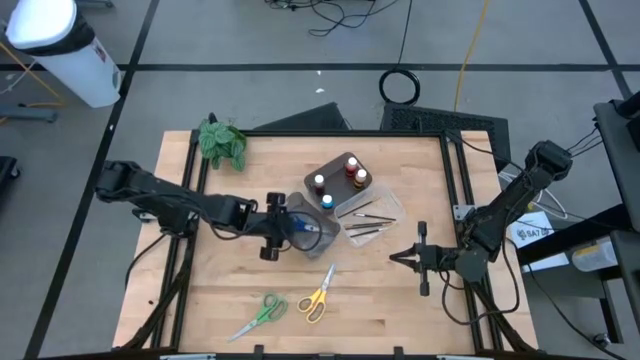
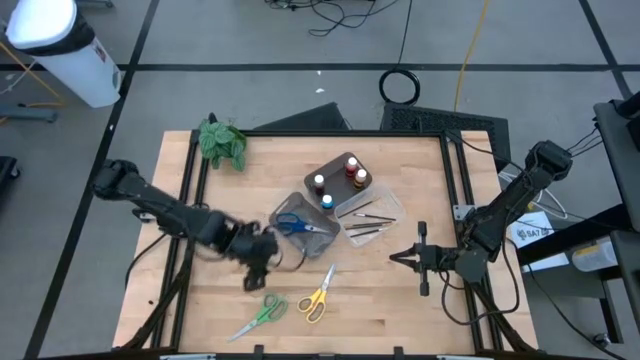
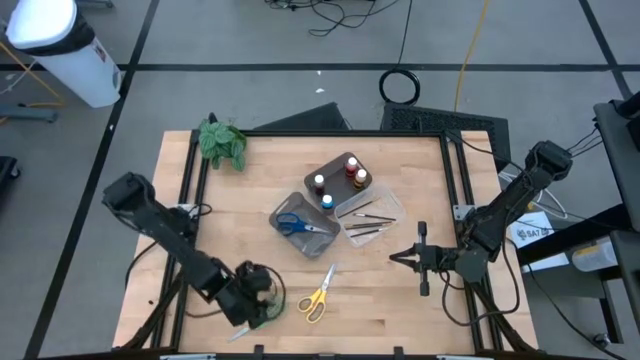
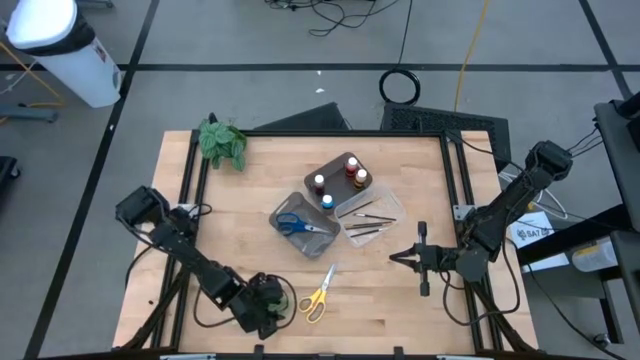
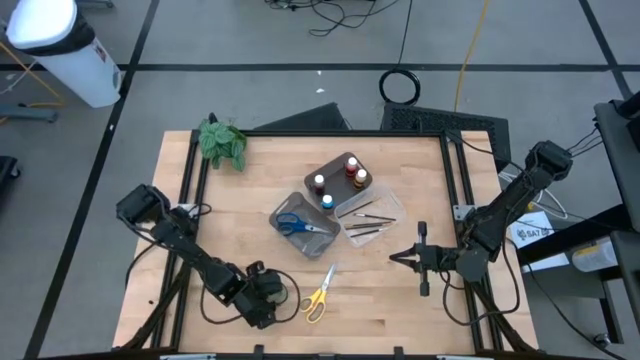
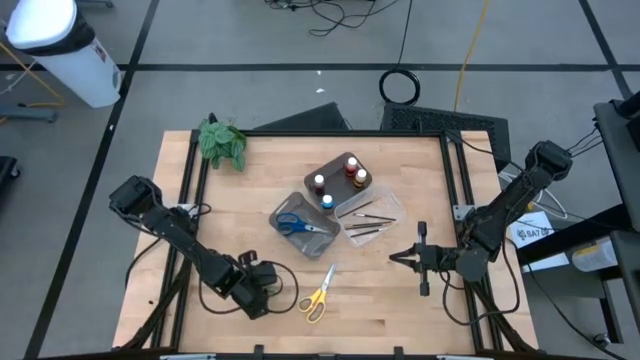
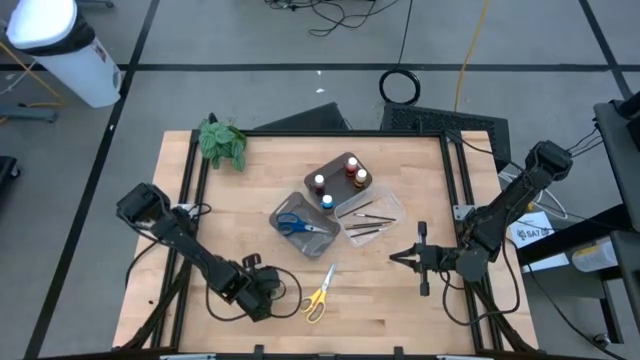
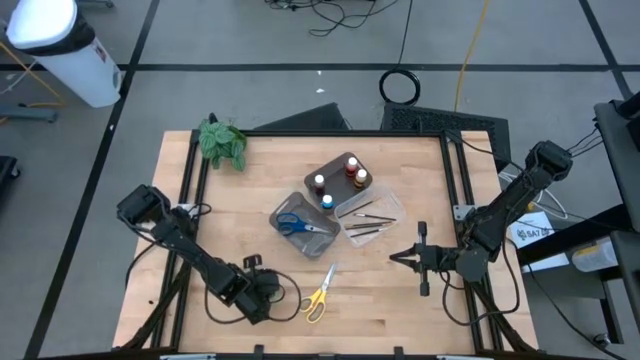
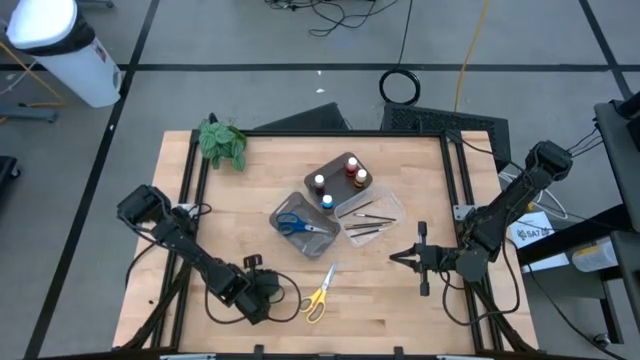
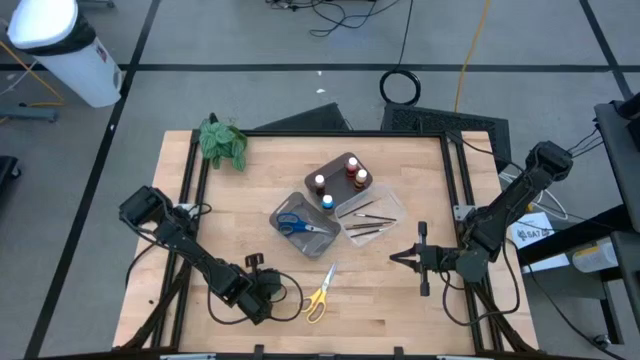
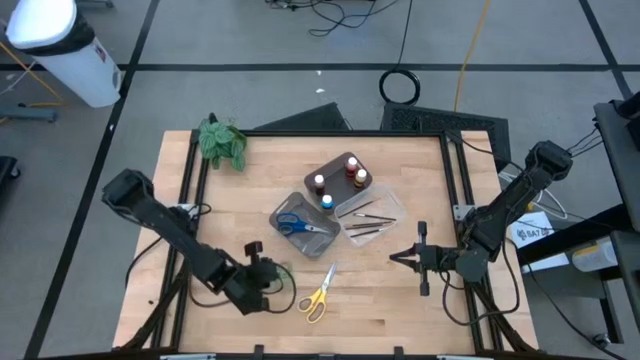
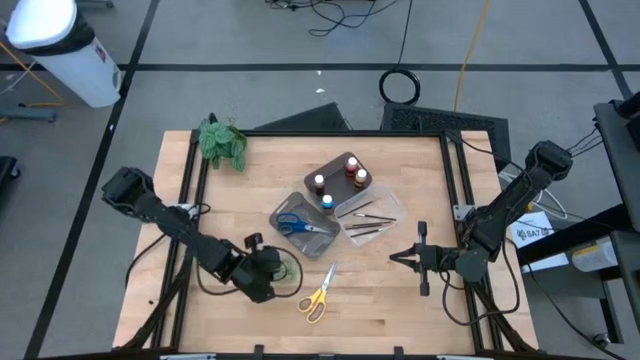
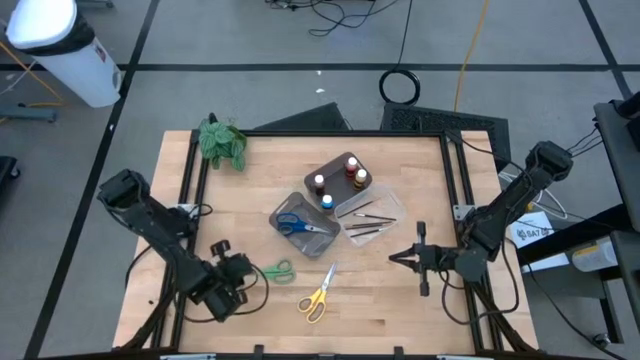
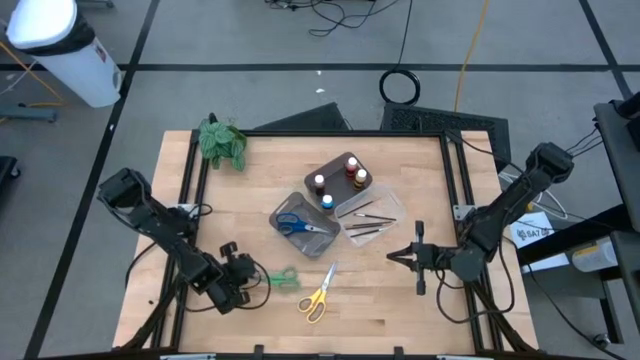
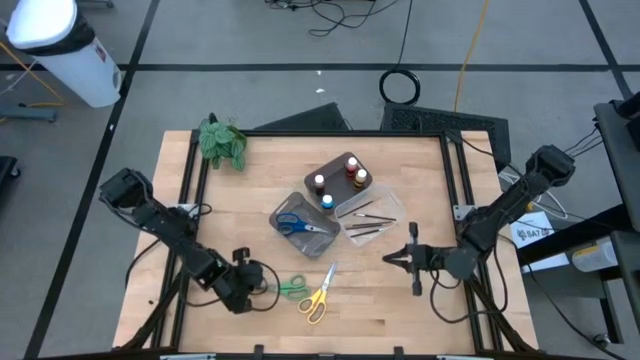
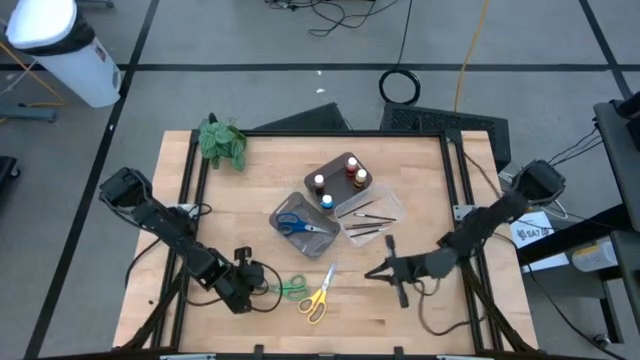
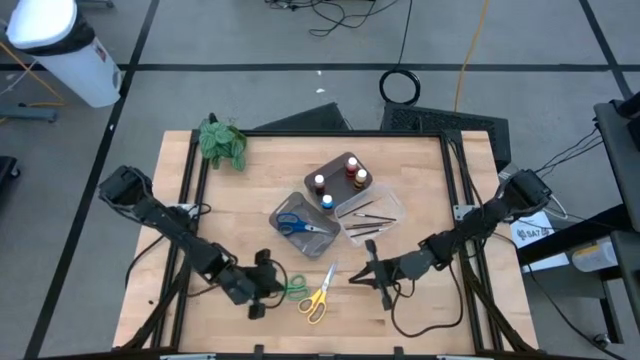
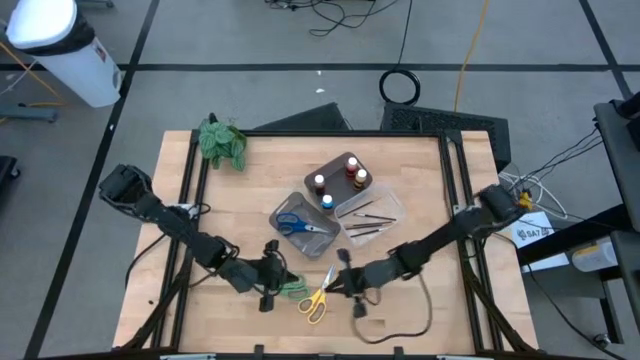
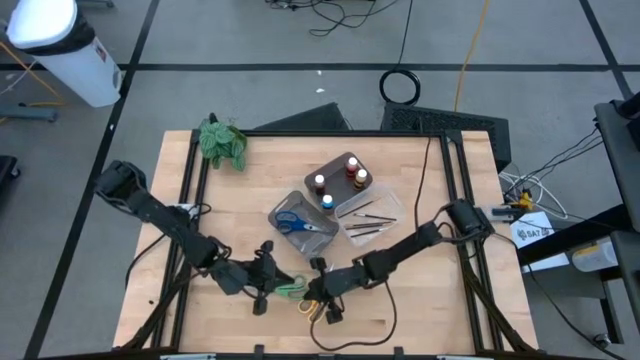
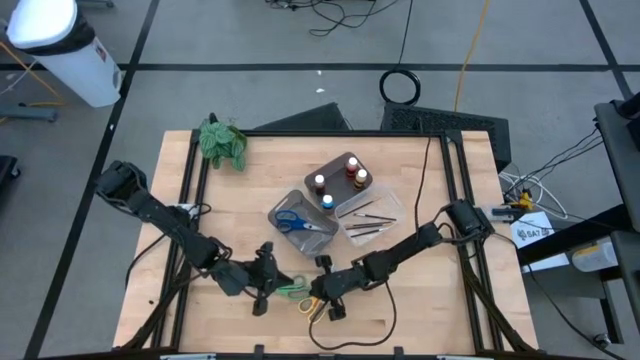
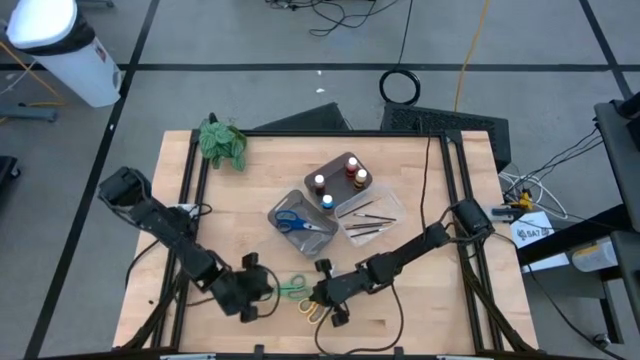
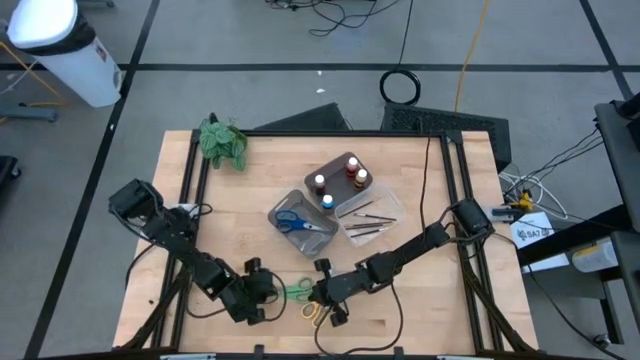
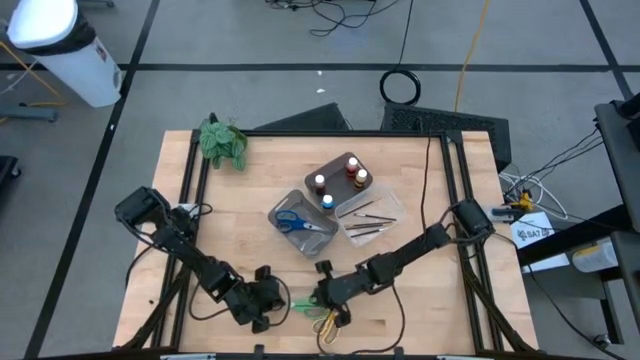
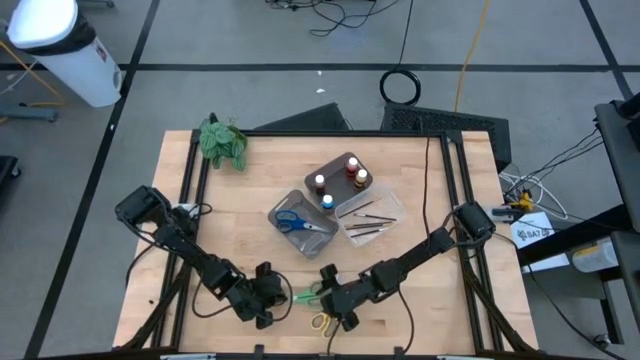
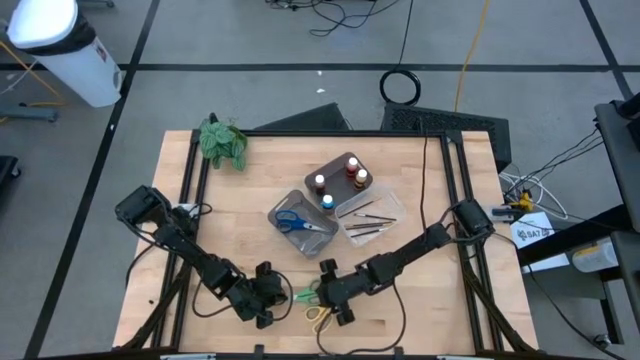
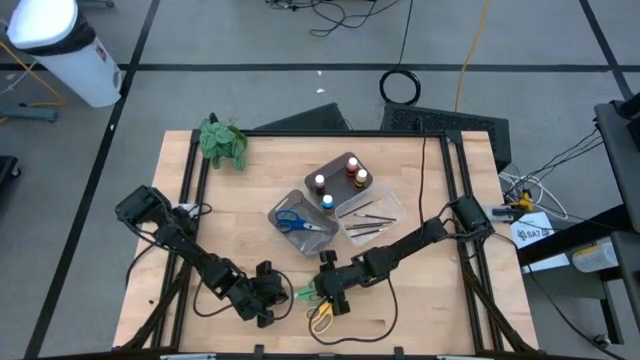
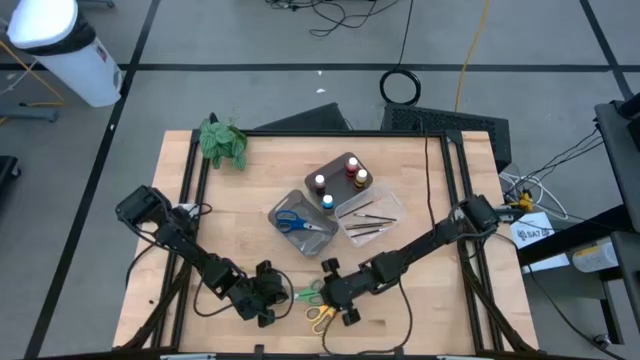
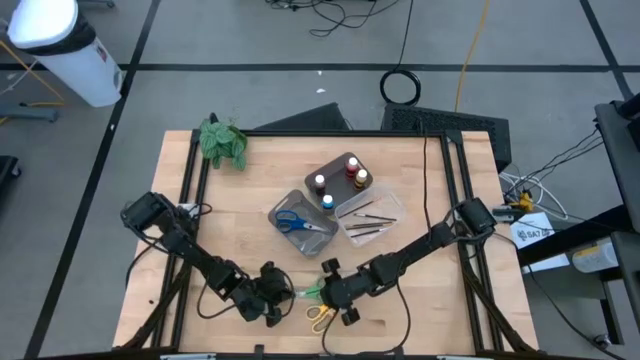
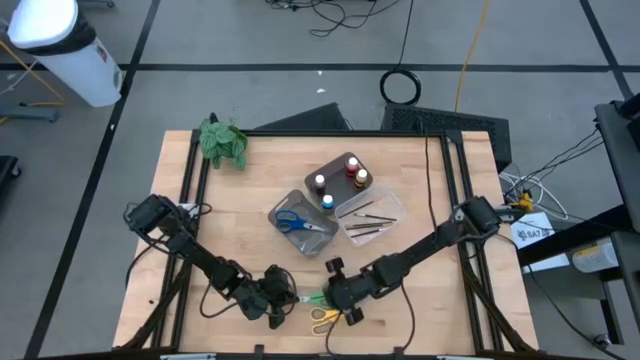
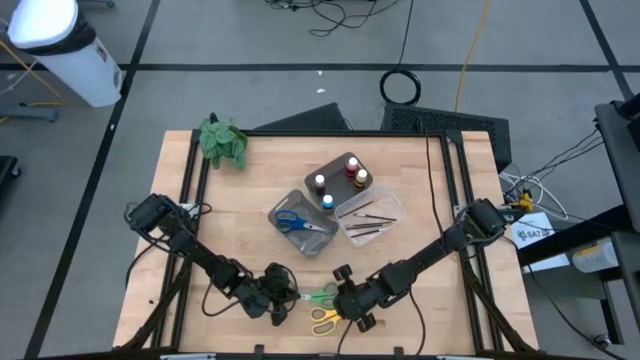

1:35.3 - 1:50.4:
Task: Pick & Place Paint Supplies
Put the green scissors into the bottom black bin

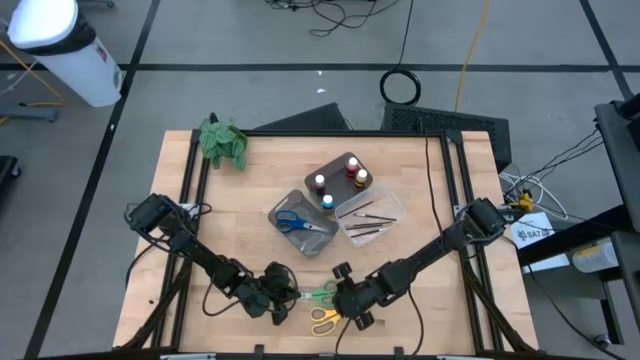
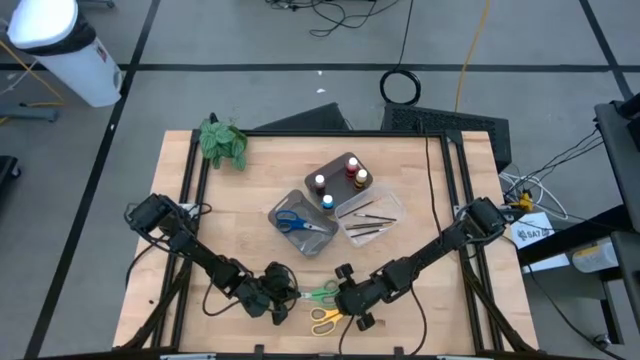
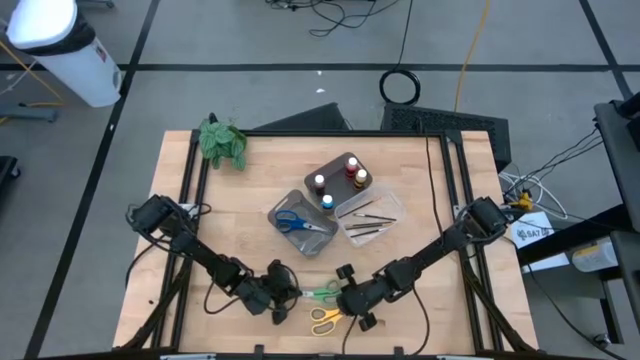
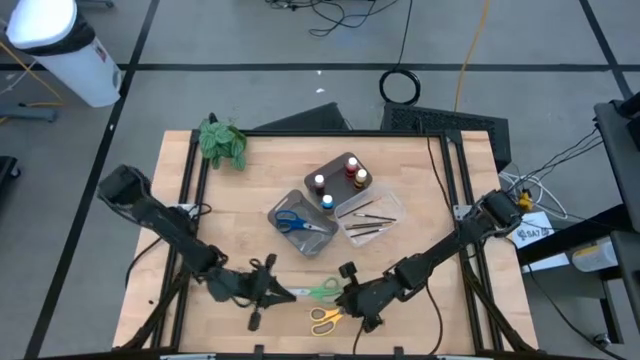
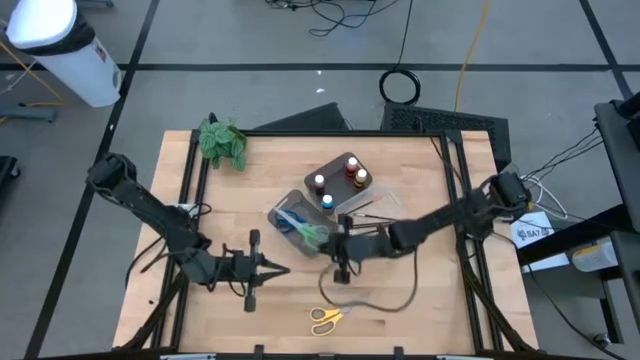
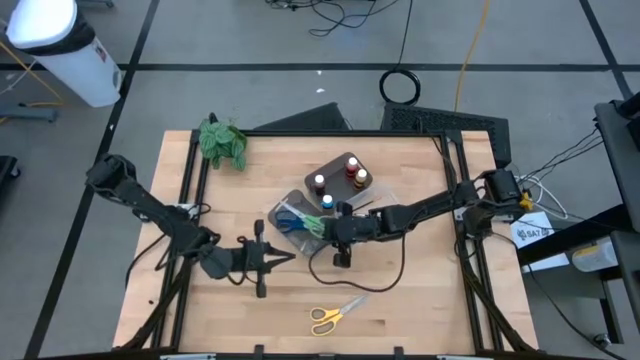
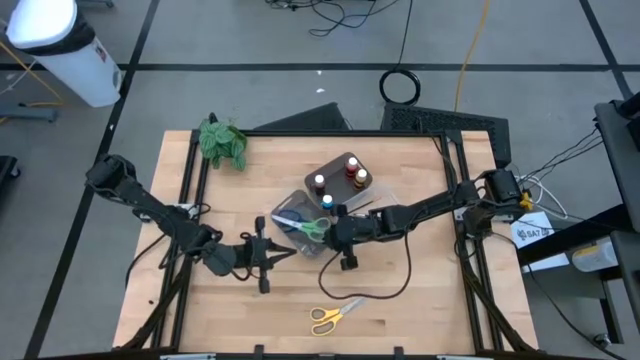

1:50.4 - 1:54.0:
Put the green scissors into the bottom black bin

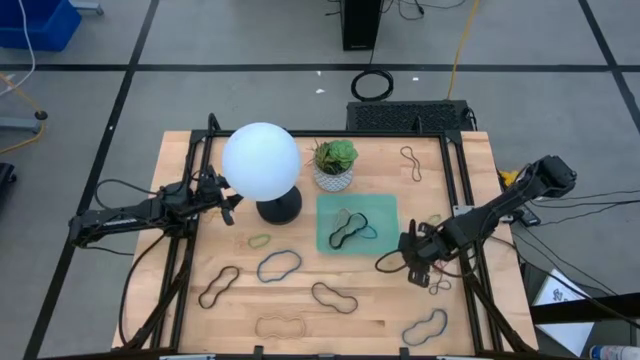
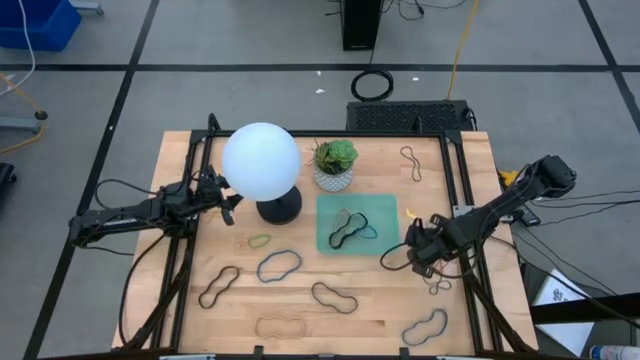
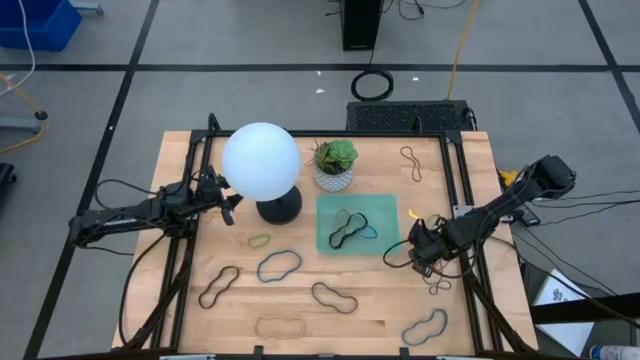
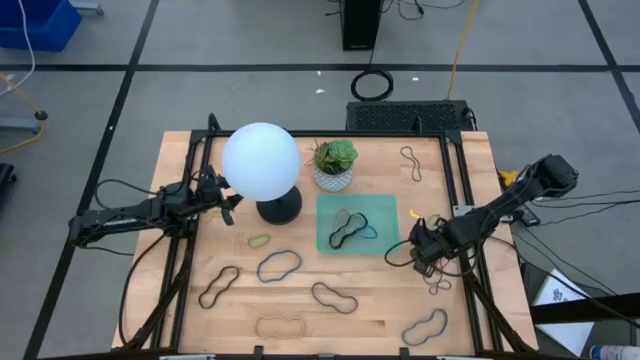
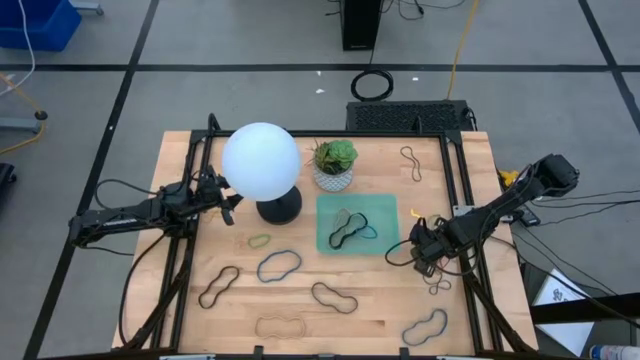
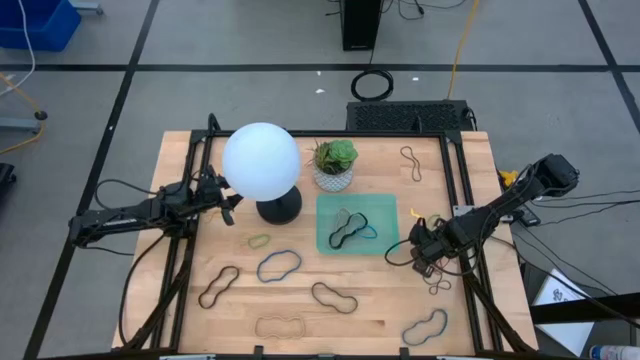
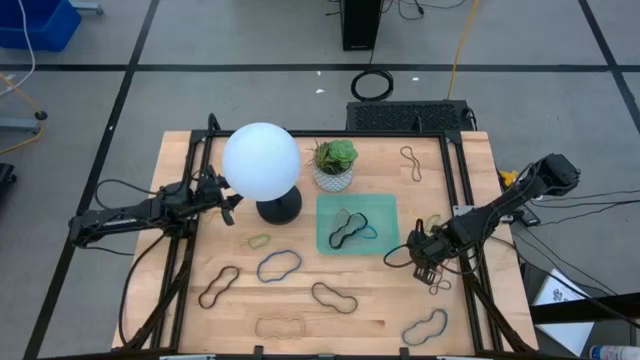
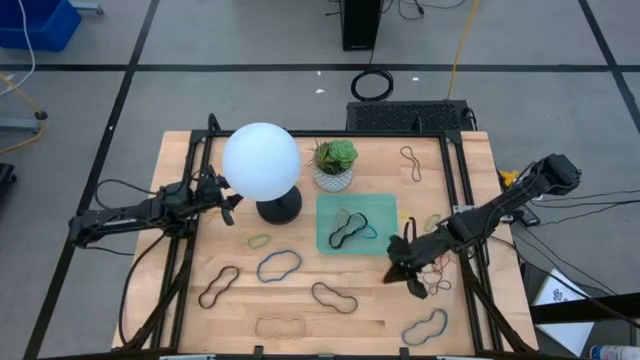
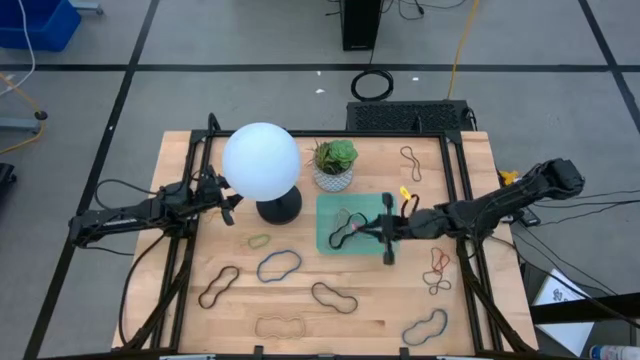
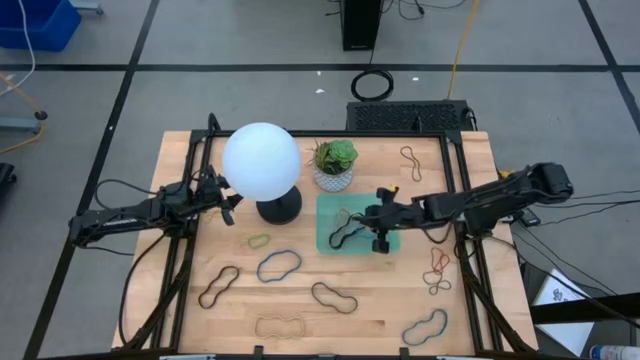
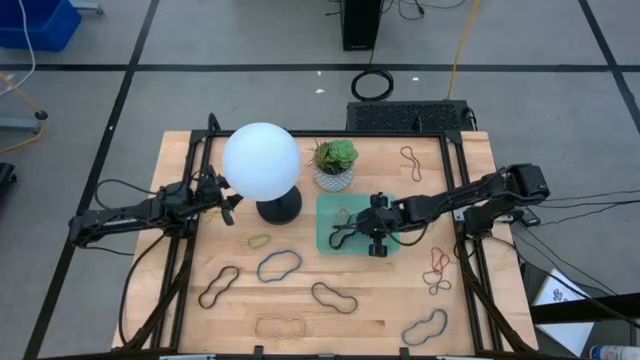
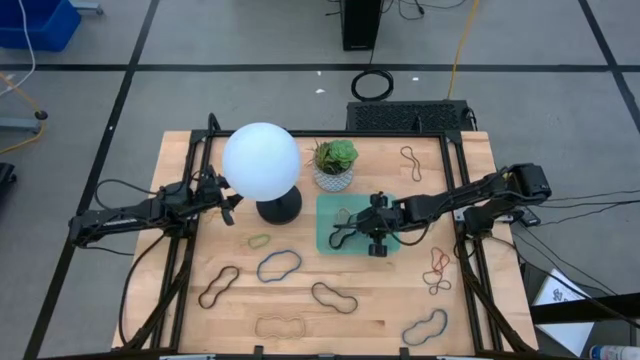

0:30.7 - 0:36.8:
Task: Pick and place rubber bands into bin
Put the orange rubber band into the blue bin
